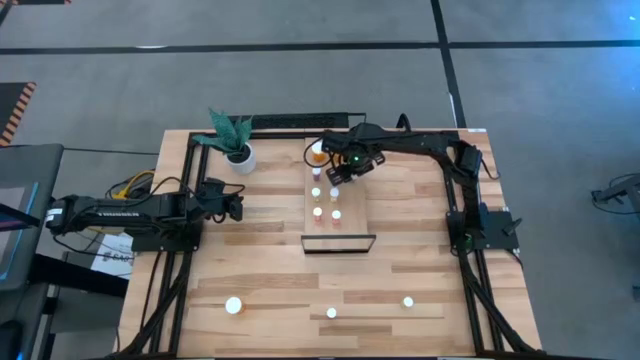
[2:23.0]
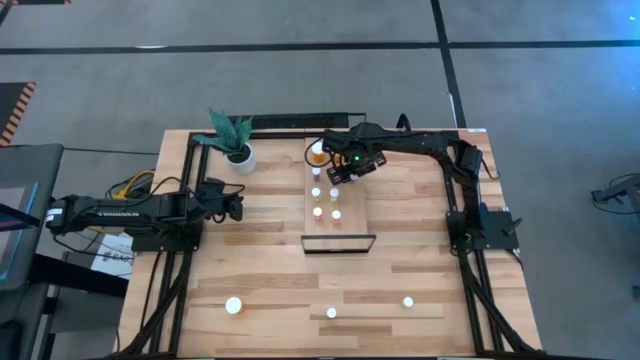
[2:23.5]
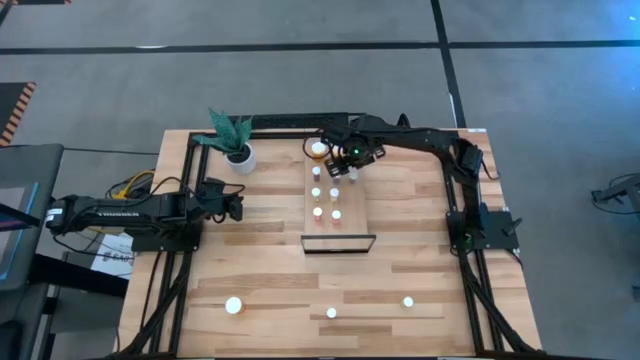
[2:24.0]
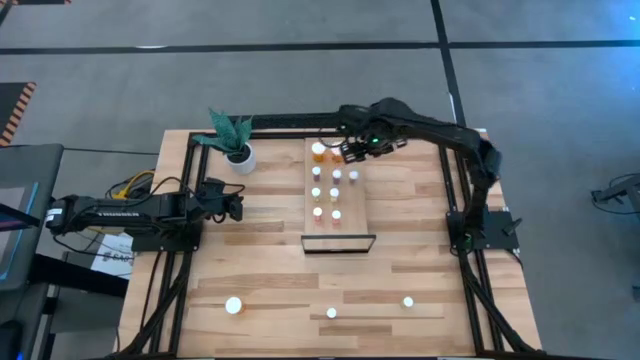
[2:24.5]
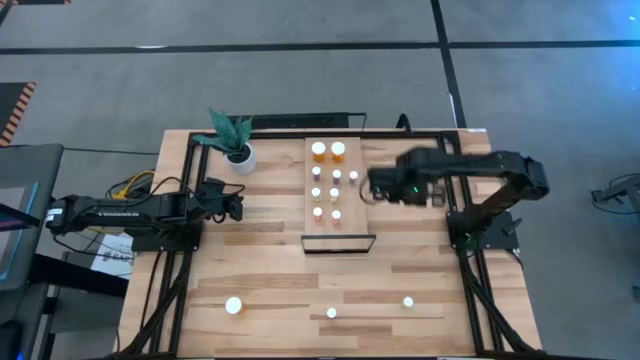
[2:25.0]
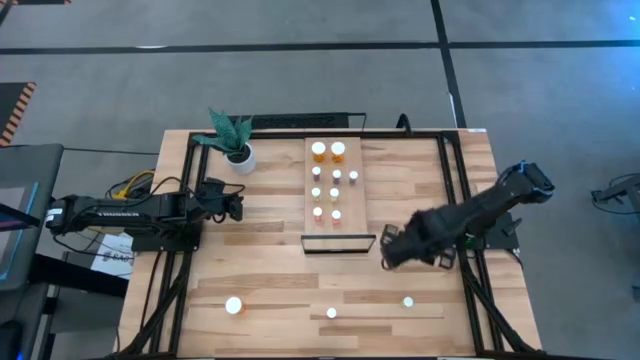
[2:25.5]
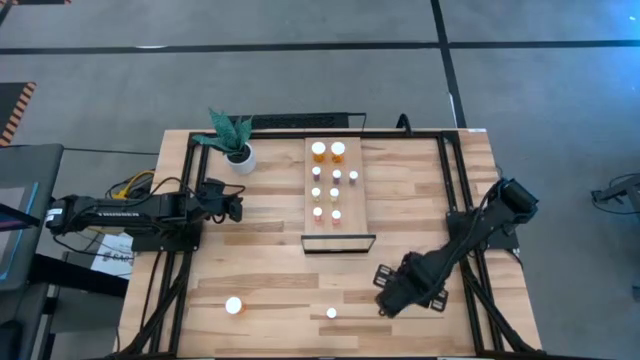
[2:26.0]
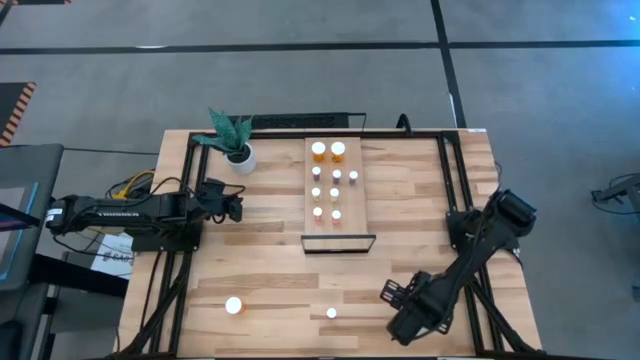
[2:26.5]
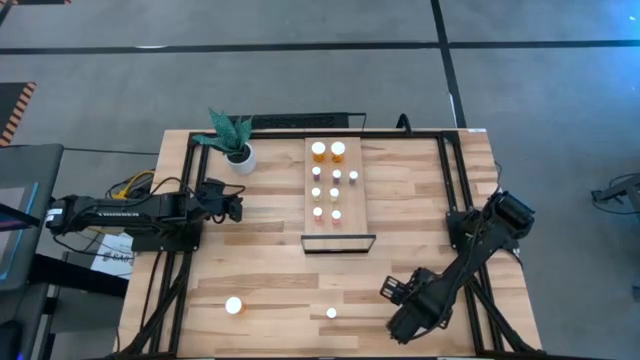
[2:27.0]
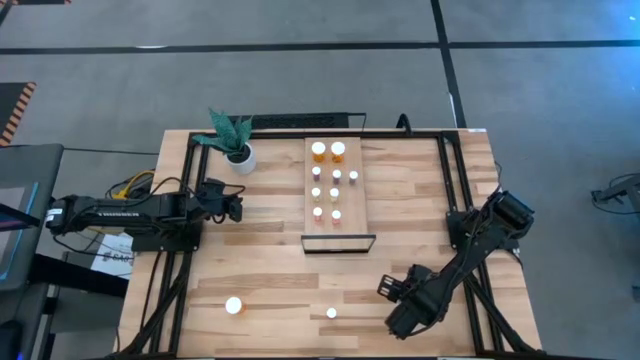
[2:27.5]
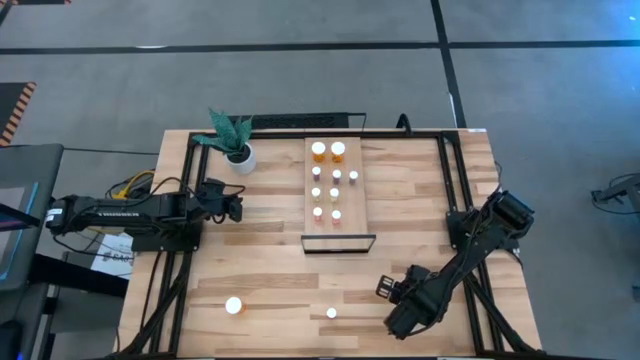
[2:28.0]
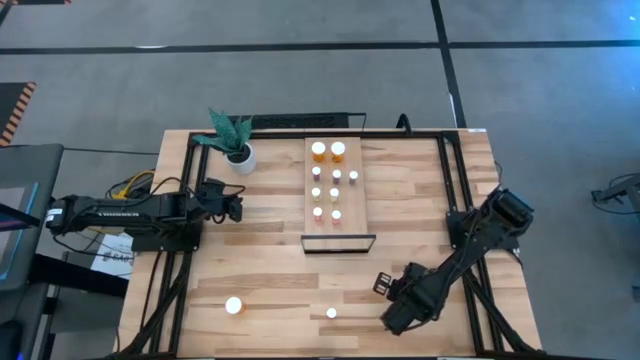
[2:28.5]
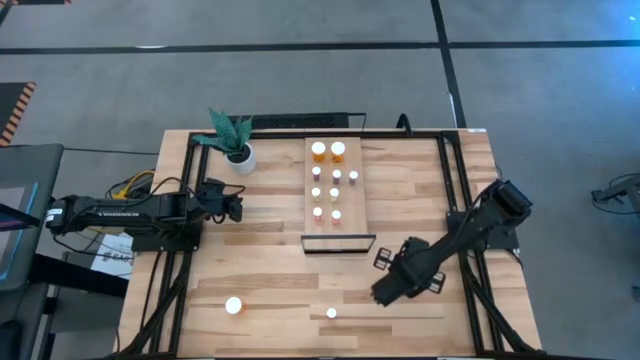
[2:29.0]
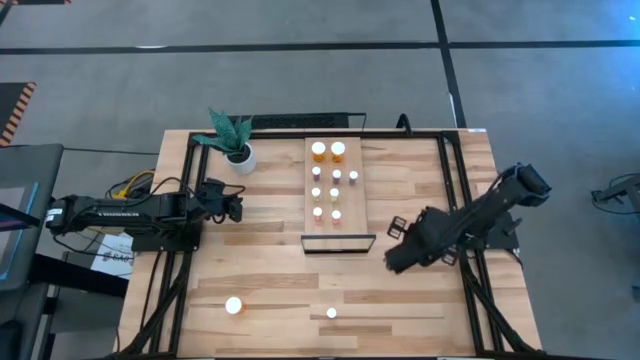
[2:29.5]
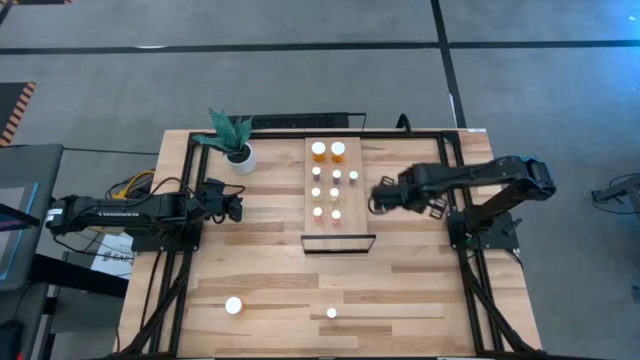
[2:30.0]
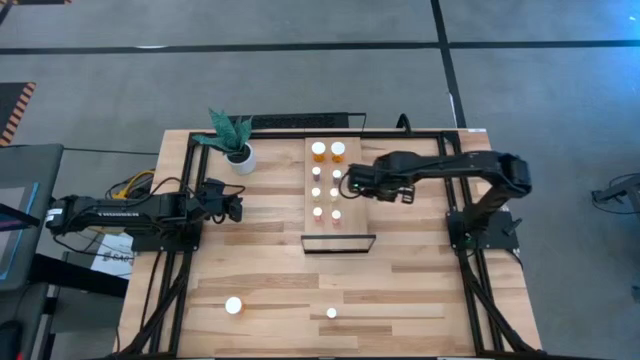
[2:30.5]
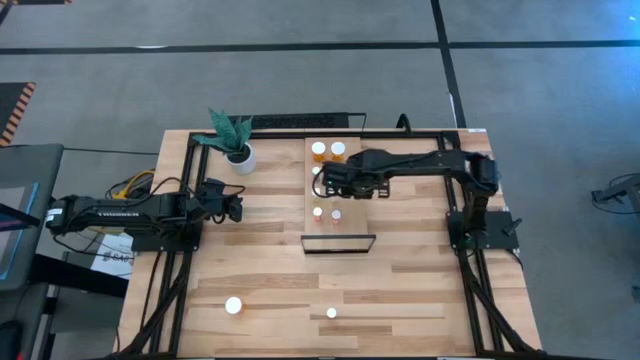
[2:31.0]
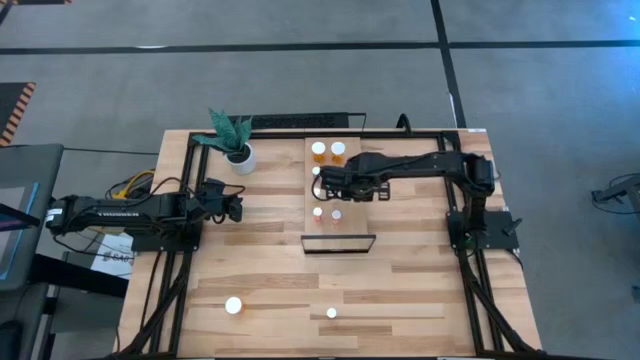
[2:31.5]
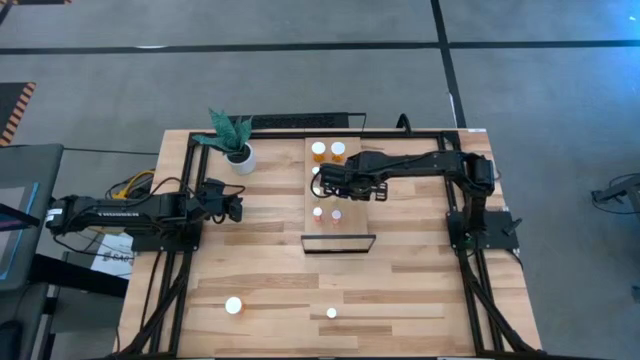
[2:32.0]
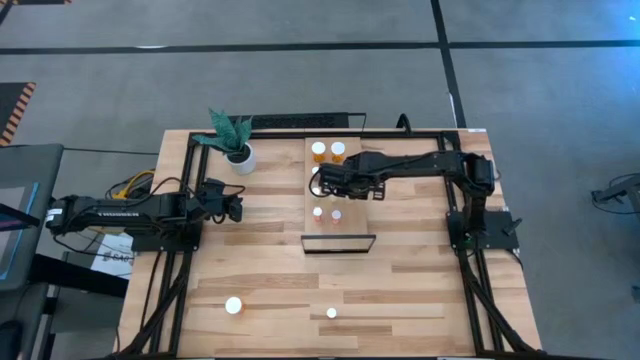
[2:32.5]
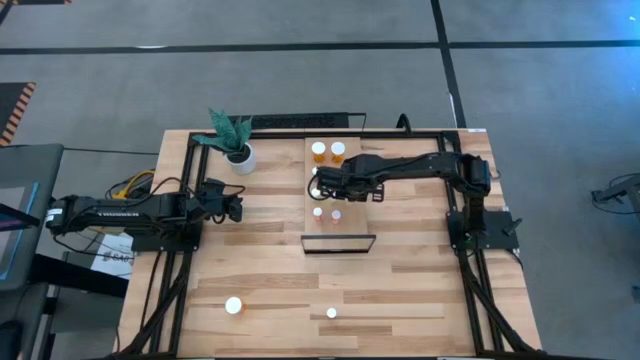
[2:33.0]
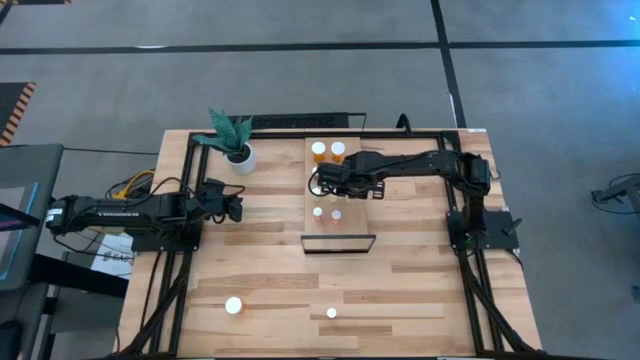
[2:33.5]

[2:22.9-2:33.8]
Task: Pick and place medicine bottles onto shelf by color
Put the yellow pill bottle on the shelf aligned with the other yellow pill bottles

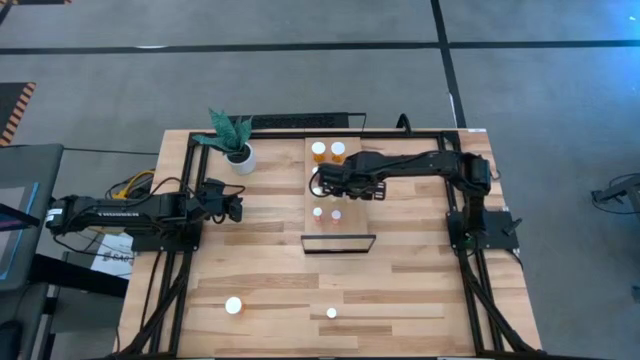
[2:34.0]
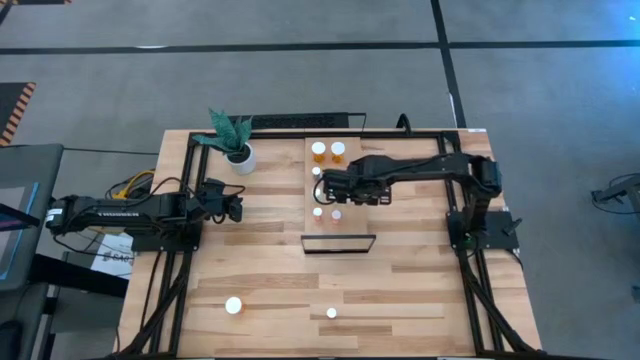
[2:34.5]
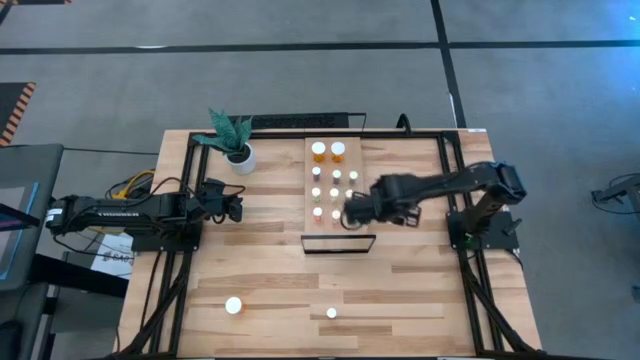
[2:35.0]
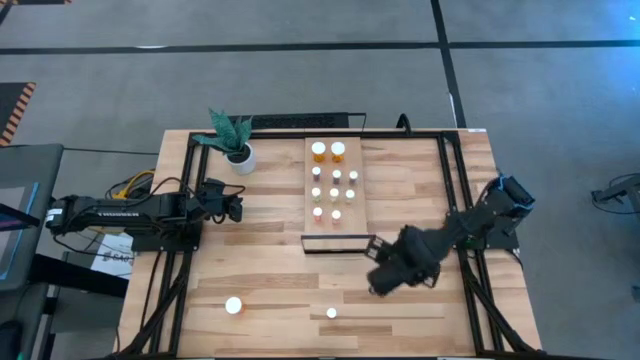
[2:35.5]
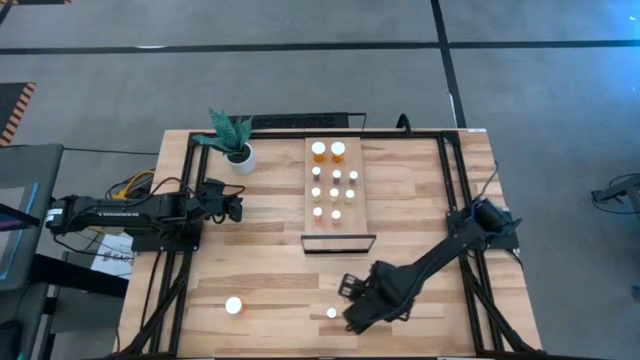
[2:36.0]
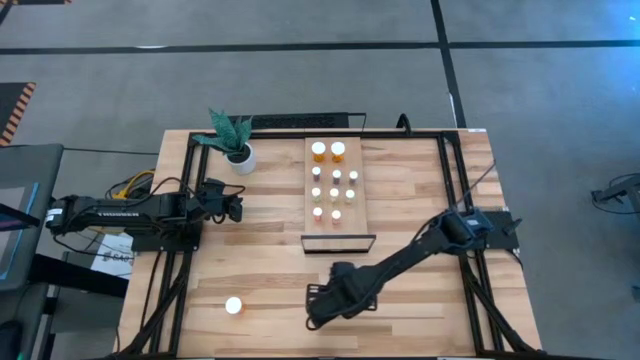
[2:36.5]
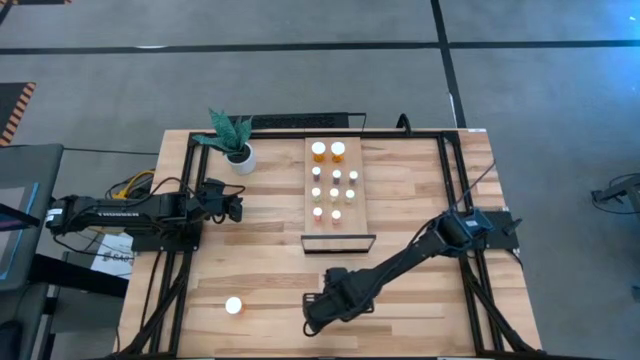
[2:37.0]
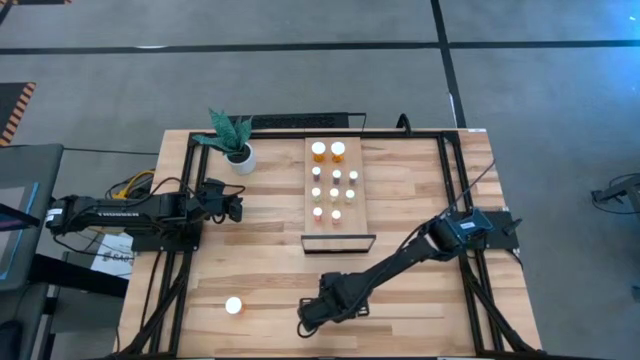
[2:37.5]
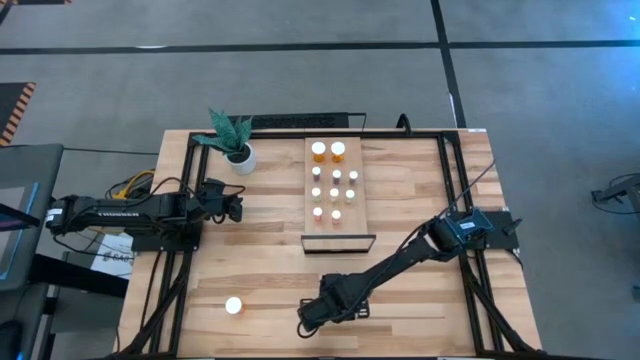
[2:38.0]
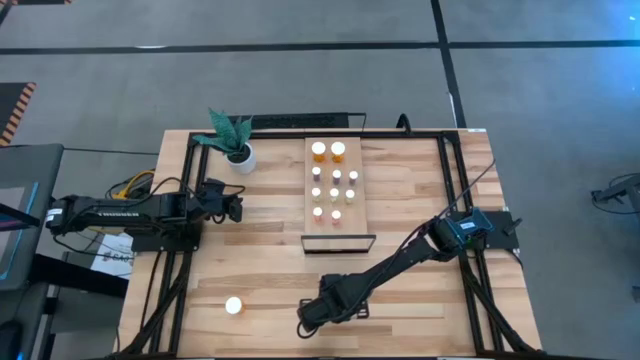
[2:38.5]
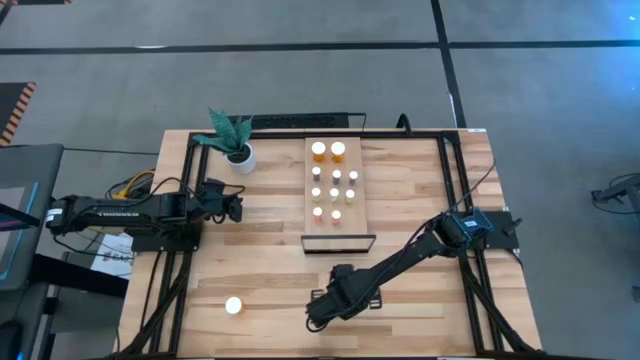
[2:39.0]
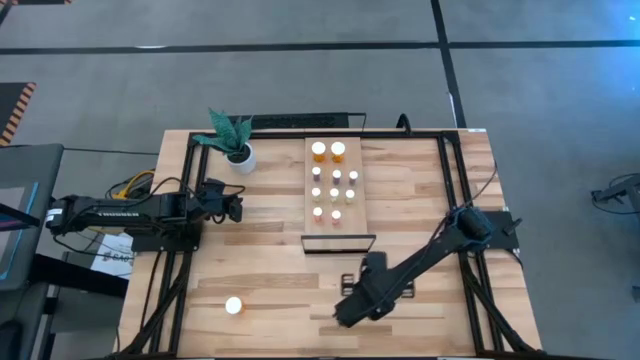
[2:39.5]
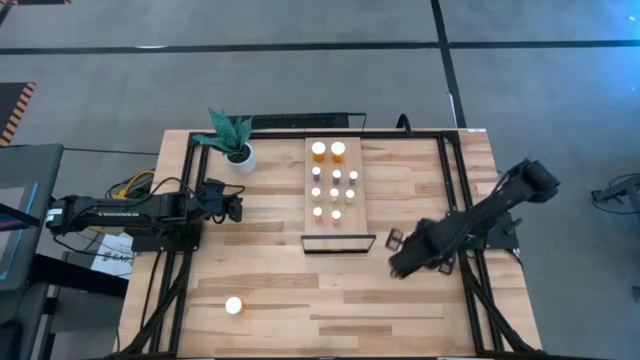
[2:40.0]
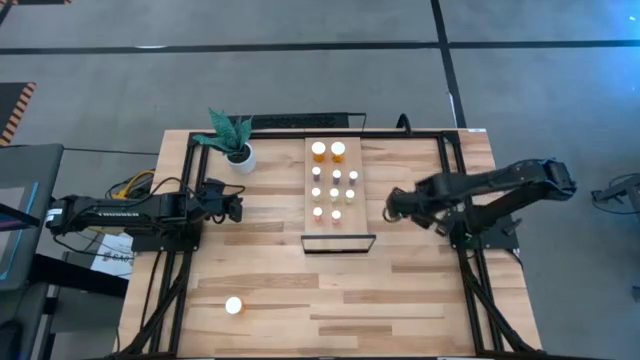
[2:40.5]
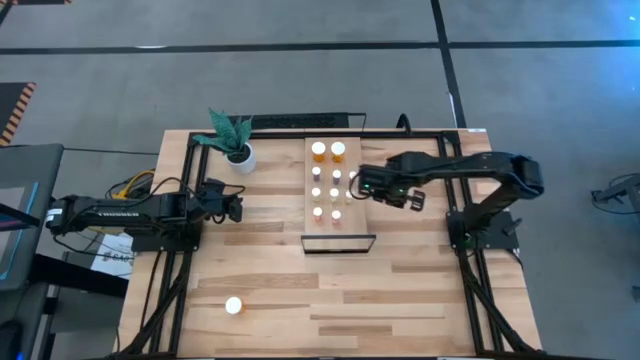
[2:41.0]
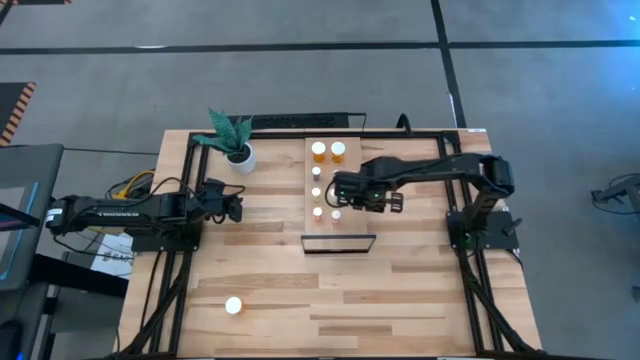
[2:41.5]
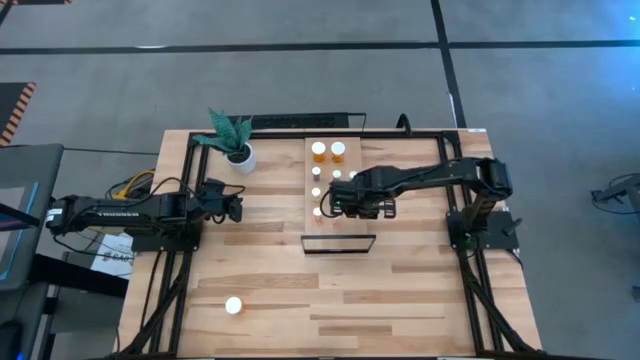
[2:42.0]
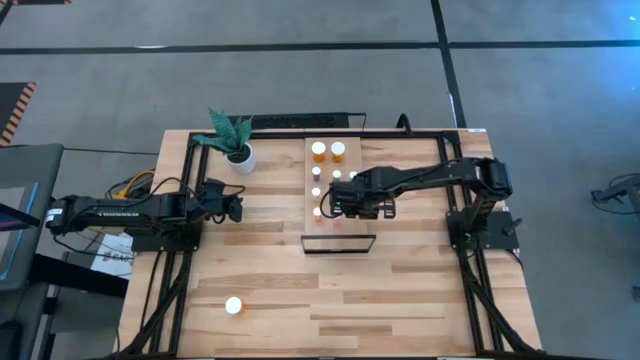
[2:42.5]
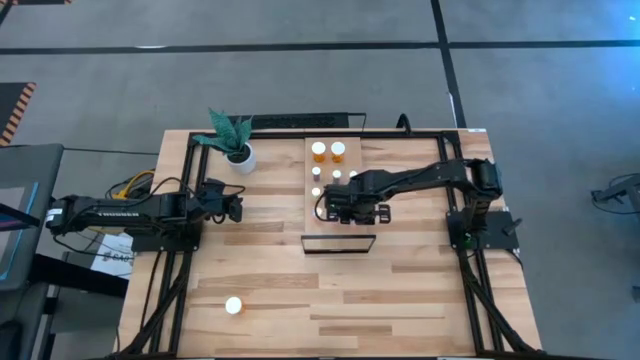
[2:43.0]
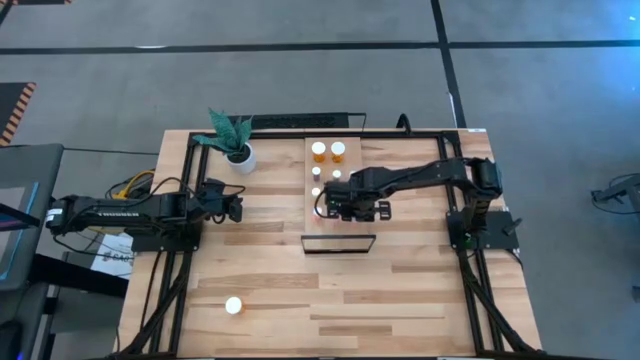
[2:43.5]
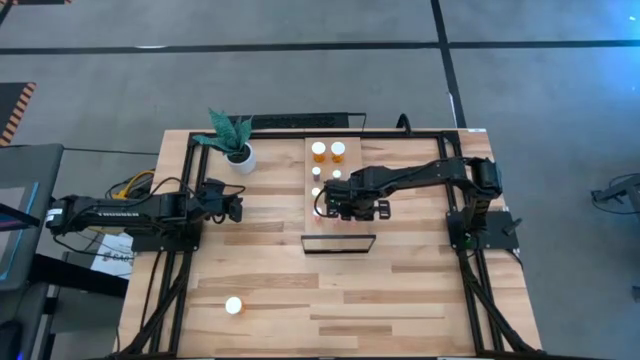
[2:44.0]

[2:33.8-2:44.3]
Put the pink pill bottle on the shelf aligned with the other pink pill bottles

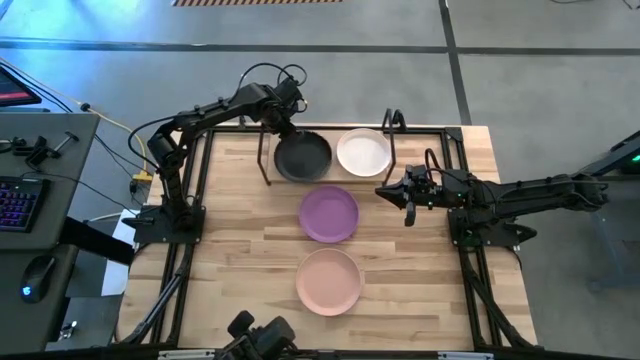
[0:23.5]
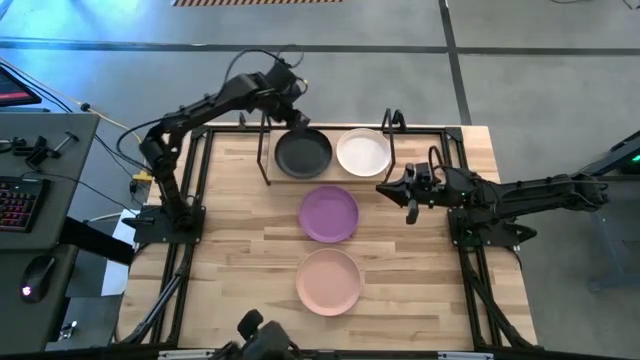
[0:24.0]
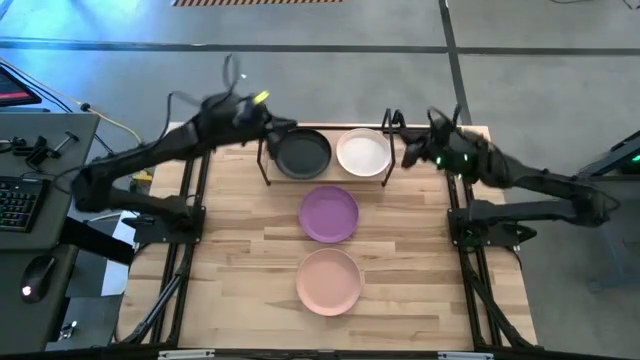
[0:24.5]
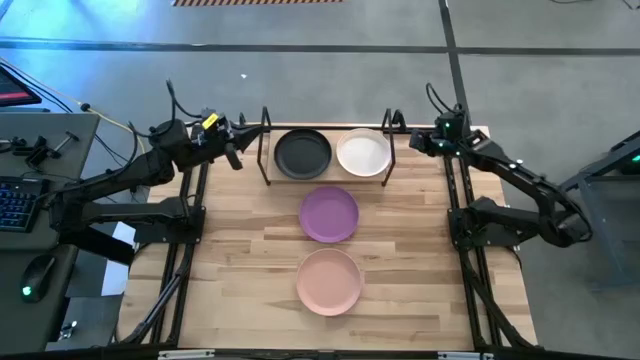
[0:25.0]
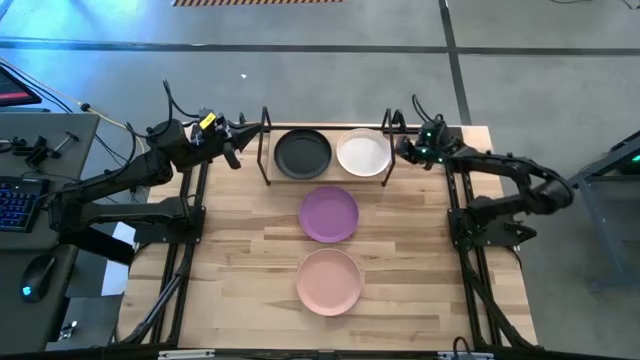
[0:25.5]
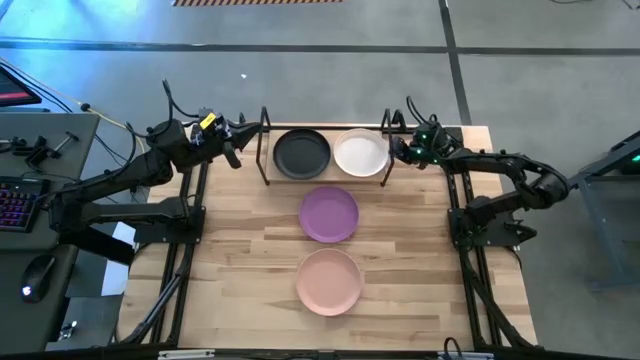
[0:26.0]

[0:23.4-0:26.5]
Task: Place and stack plates onto a shelf
Adjust the white plate on the shelf
